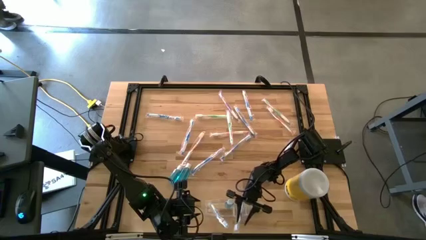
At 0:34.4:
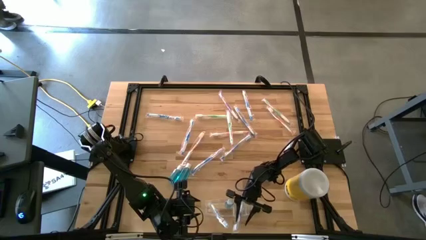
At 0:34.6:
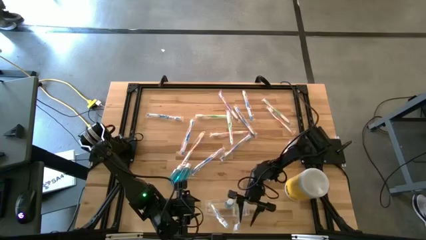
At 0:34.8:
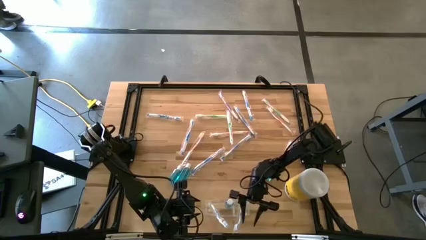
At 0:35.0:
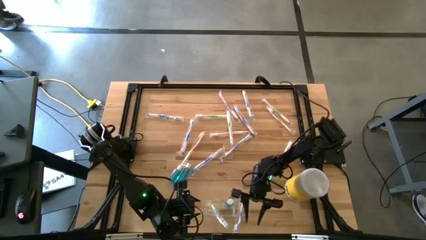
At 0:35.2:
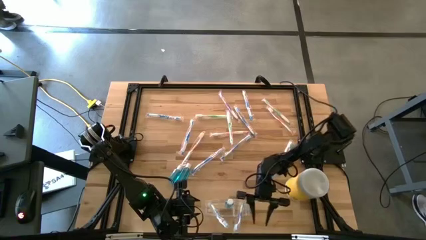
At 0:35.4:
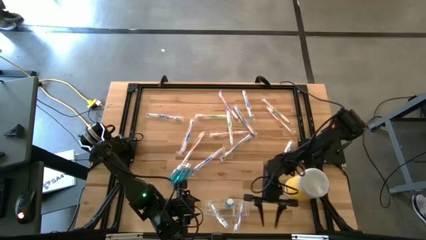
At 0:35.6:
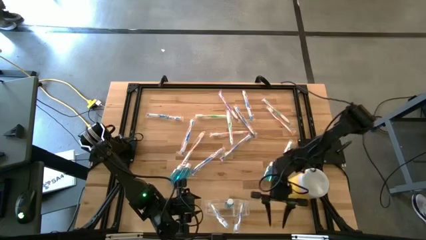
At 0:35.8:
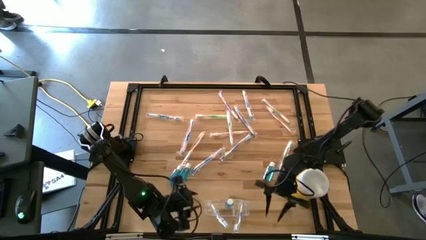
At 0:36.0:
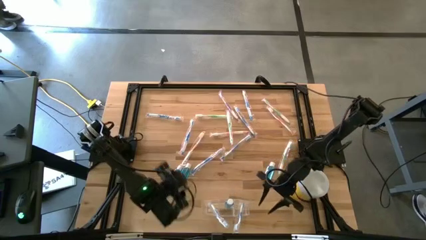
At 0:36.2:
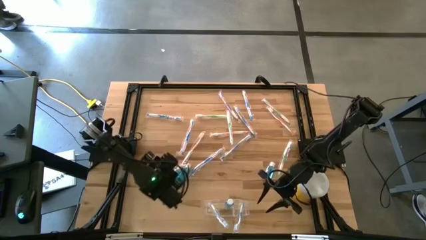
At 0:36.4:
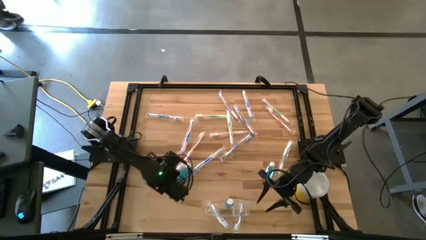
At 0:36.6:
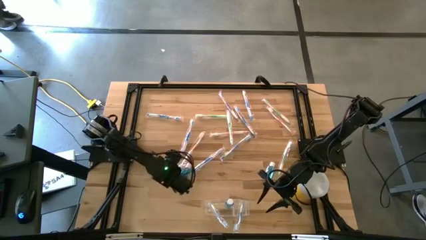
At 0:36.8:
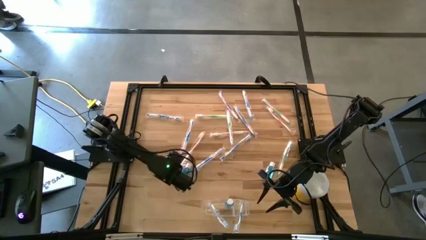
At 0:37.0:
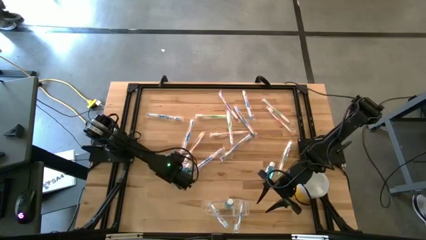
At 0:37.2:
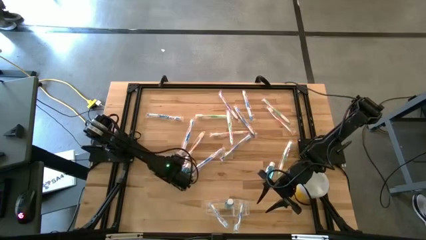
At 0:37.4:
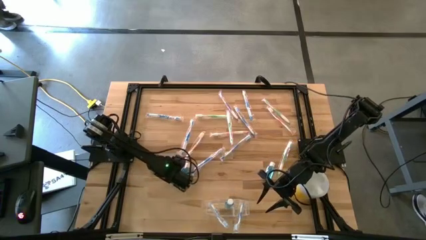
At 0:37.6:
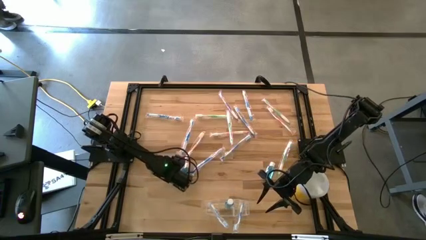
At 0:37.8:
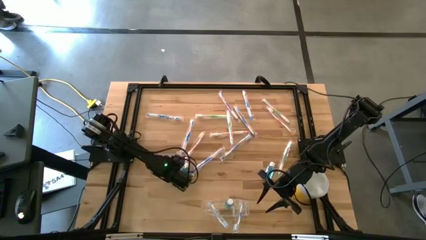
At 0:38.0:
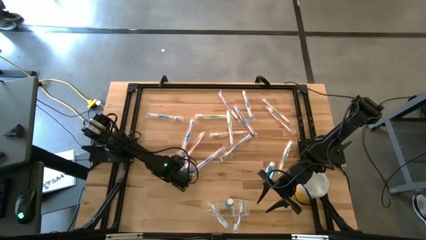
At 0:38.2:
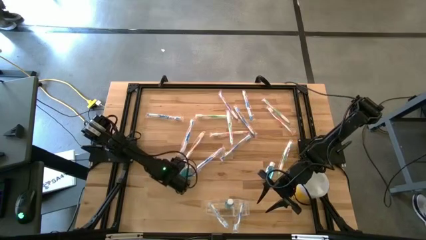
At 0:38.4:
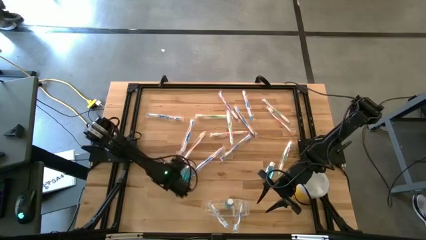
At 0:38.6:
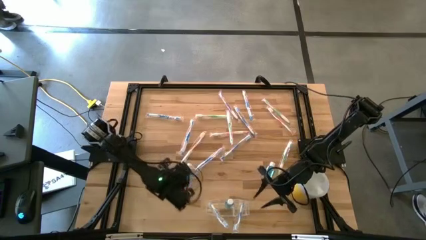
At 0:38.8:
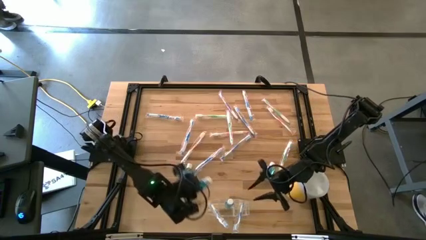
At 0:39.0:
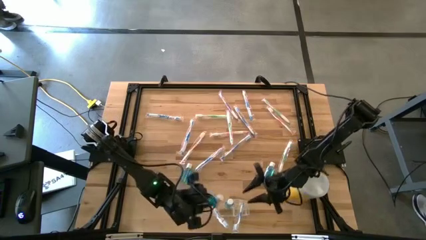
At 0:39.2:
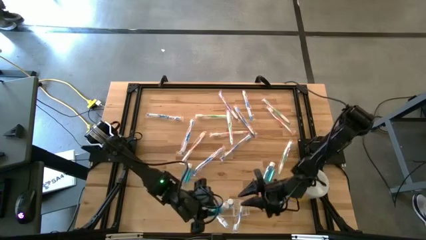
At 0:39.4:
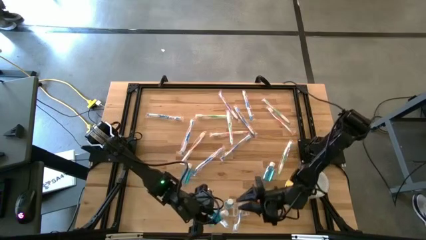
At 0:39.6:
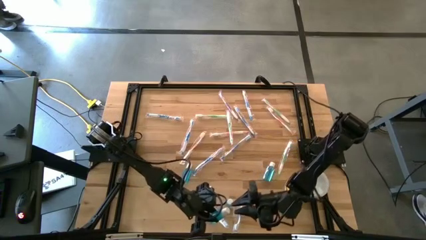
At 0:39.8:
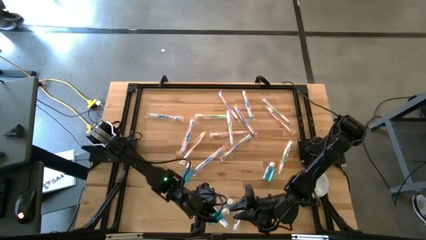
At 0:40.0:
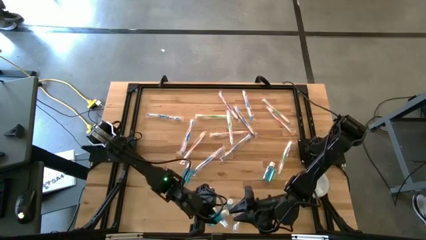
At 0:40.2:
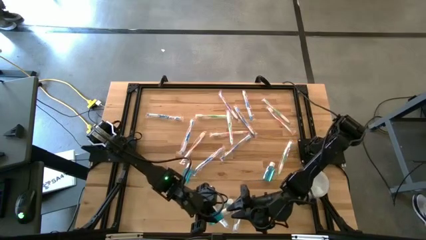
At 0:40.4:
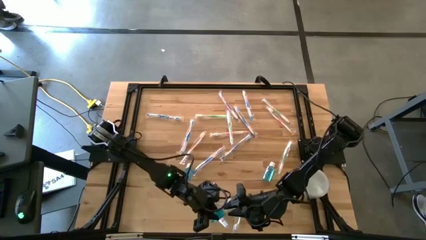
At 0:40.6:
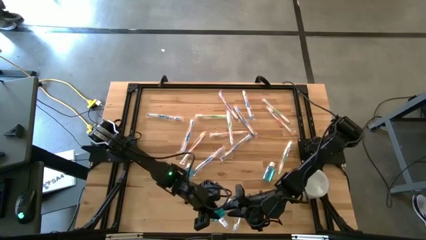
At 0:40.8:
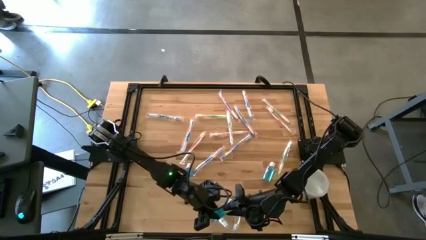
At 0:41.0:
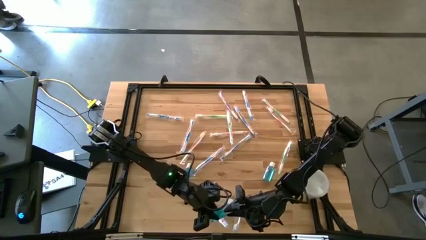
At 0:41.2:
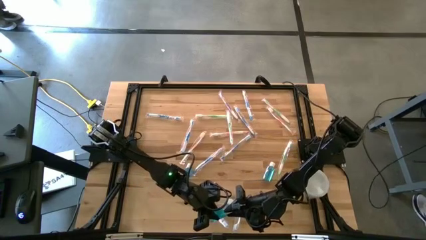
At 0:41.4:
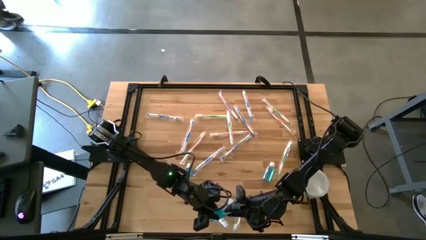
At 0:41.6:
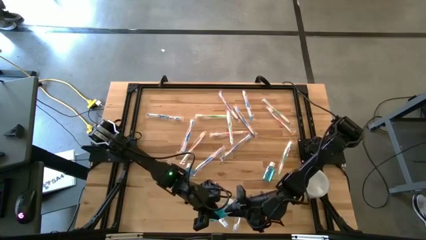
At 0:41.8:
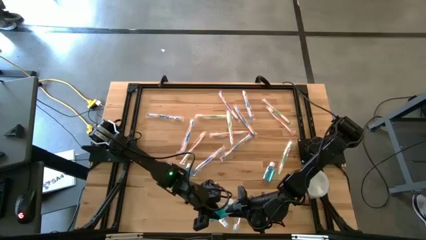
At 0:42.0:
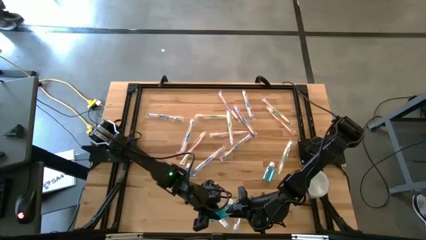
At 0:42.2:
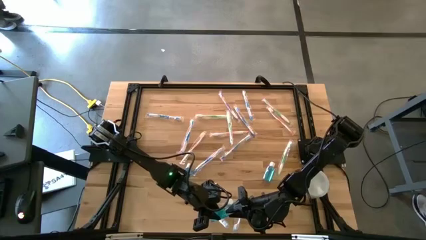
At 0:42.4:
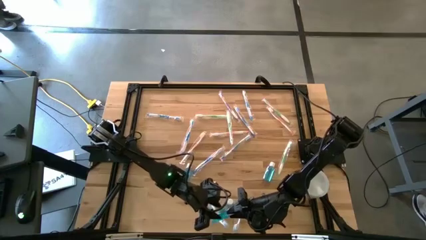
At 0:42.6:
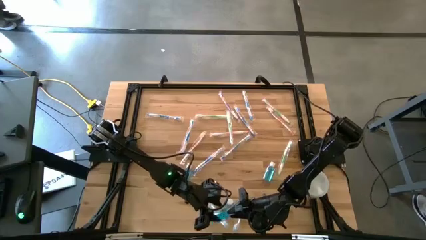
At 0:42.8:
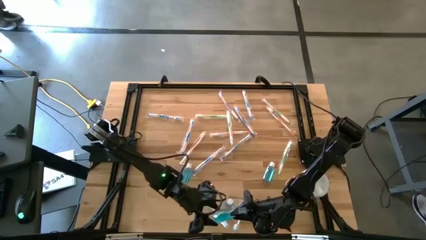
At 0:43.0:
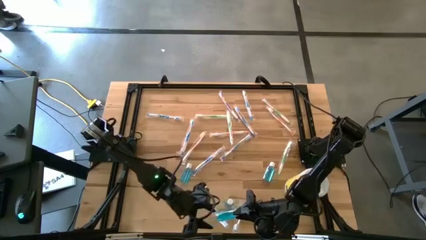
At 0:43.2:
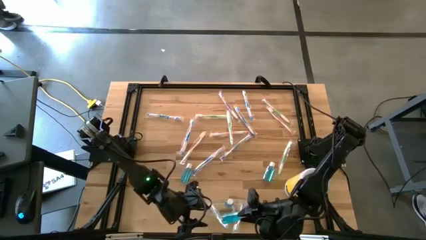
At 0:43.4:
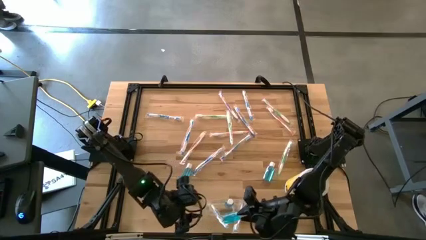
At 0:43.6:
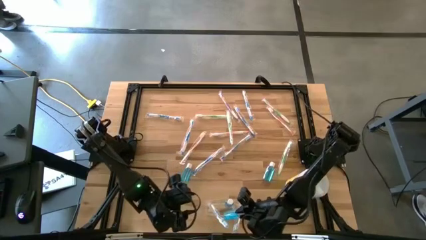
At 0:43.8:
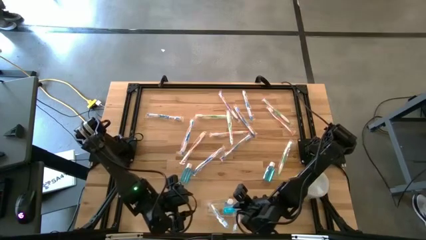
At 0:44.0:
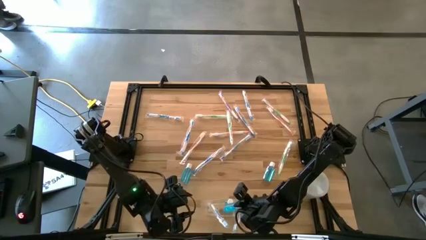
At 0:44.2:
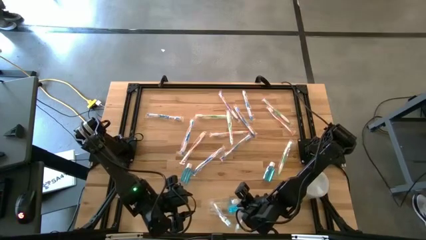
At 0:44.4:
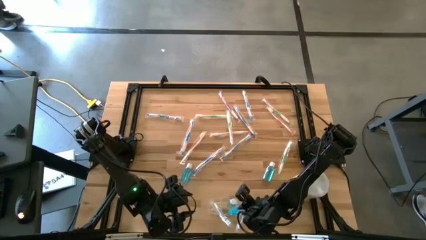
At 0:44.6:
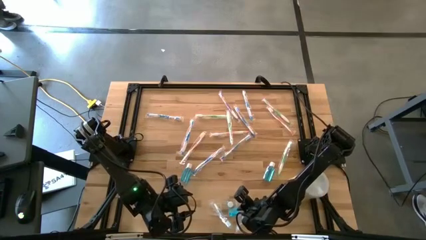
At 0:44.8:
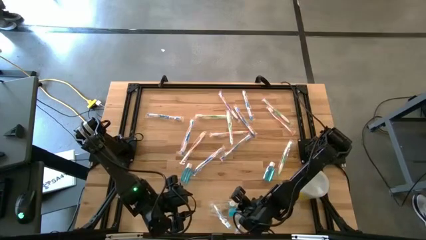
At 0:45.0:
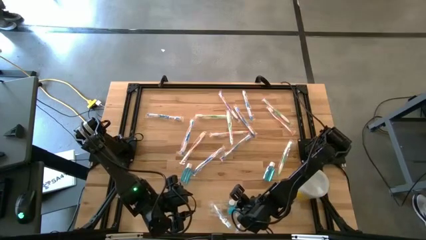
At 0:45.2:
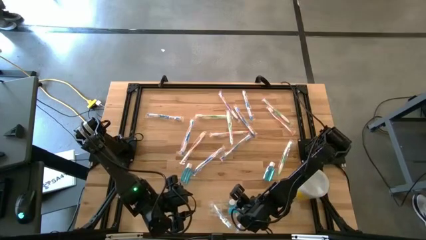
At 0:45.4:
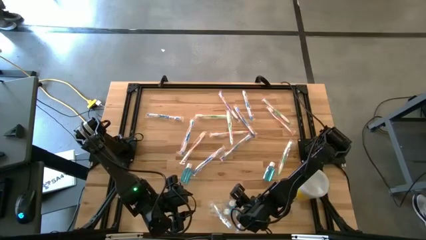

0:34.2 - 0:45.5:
Task: Pick & Place toothbrushing station
Put the mouthwash into the transparent organizer
